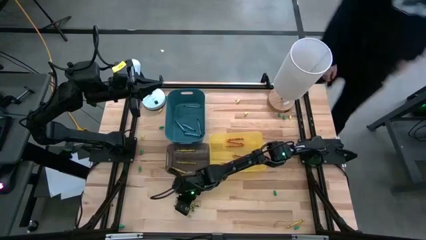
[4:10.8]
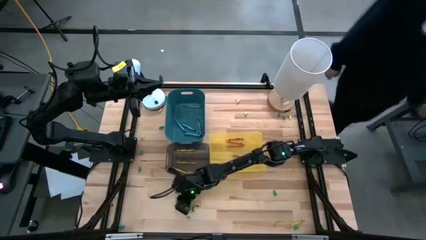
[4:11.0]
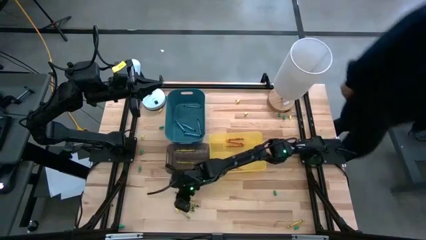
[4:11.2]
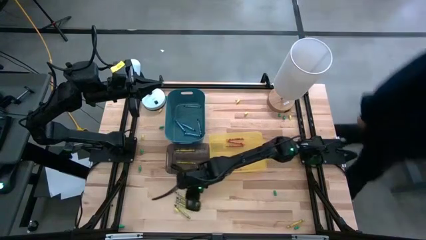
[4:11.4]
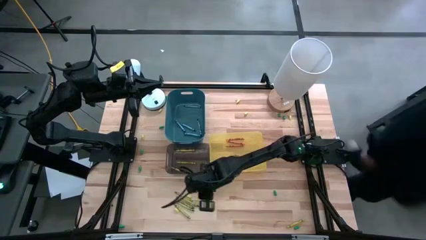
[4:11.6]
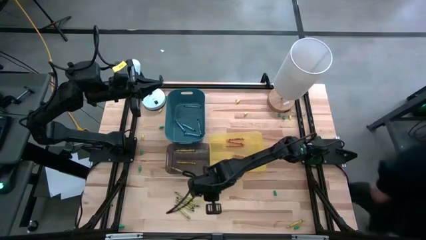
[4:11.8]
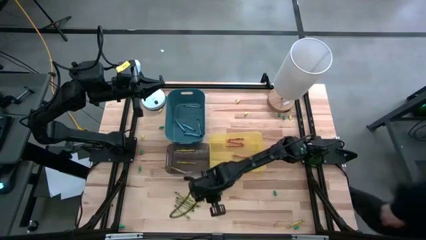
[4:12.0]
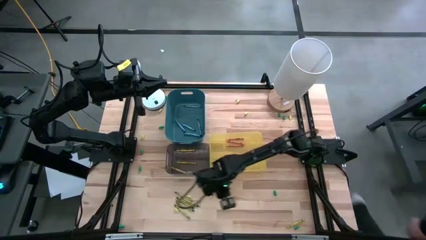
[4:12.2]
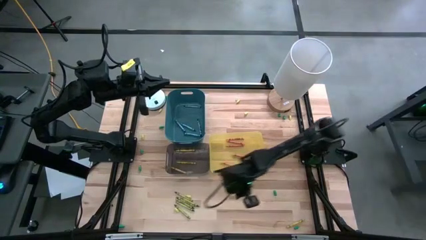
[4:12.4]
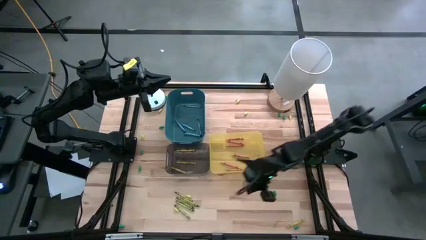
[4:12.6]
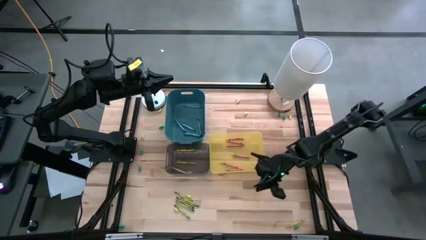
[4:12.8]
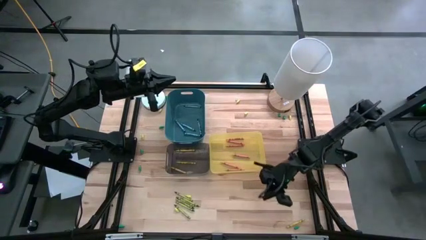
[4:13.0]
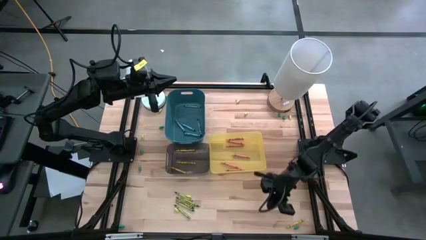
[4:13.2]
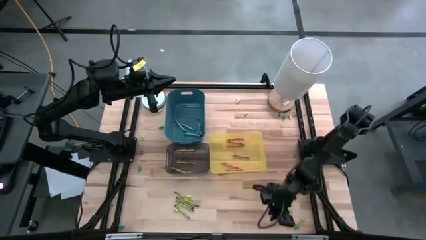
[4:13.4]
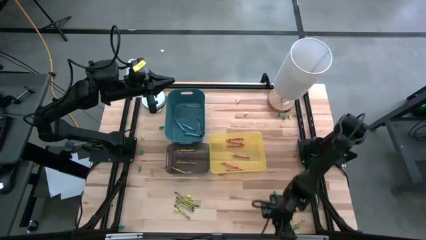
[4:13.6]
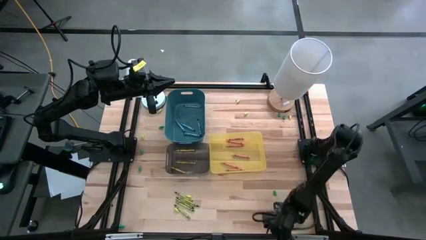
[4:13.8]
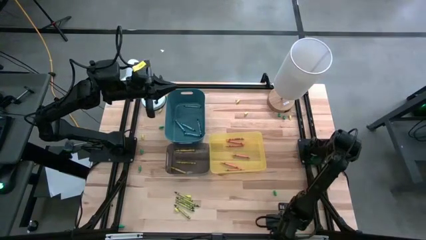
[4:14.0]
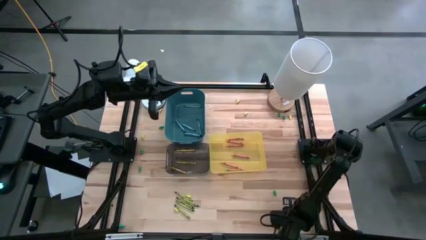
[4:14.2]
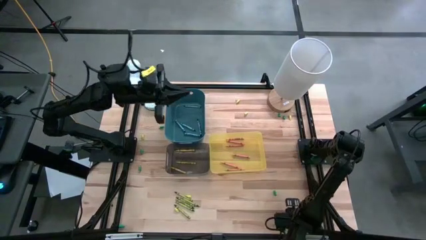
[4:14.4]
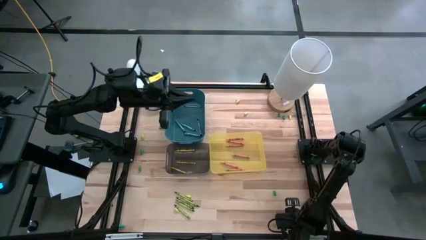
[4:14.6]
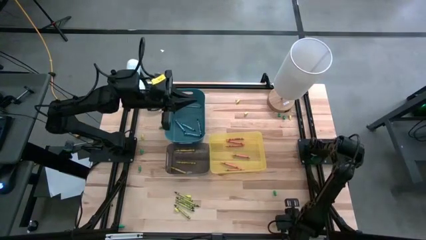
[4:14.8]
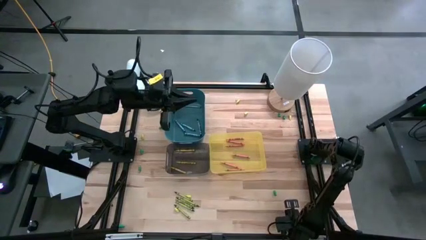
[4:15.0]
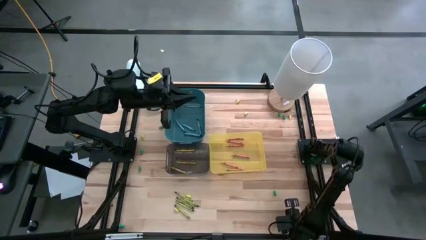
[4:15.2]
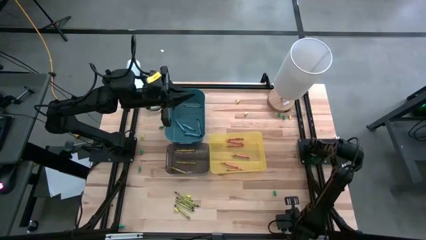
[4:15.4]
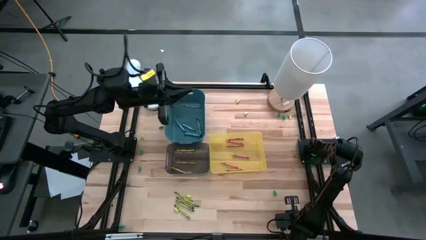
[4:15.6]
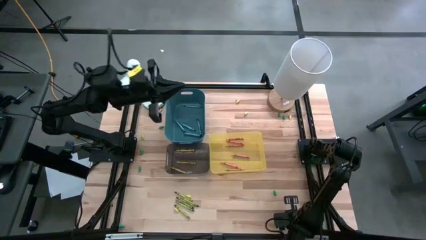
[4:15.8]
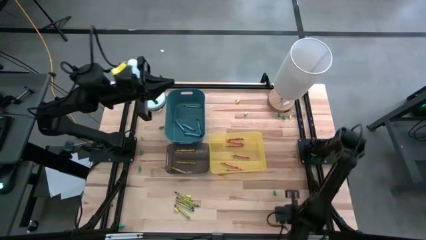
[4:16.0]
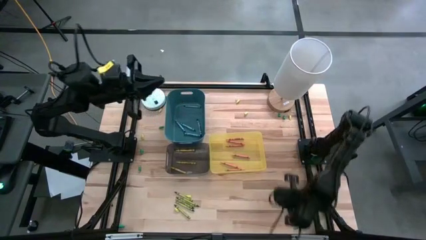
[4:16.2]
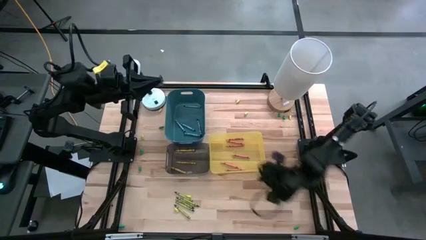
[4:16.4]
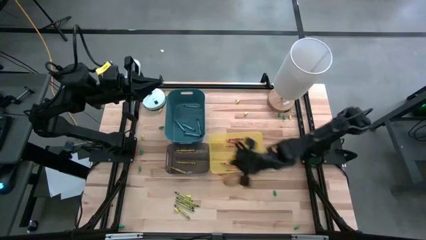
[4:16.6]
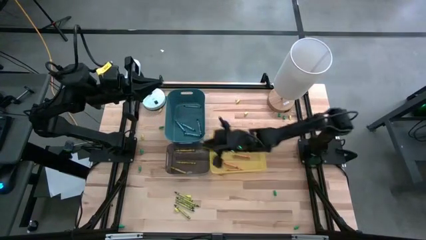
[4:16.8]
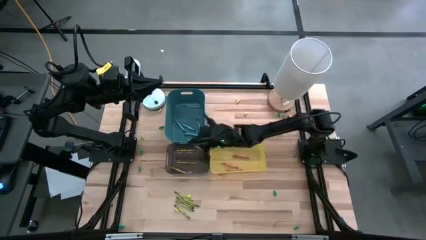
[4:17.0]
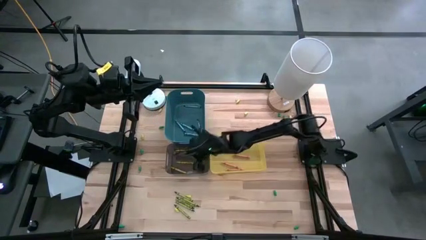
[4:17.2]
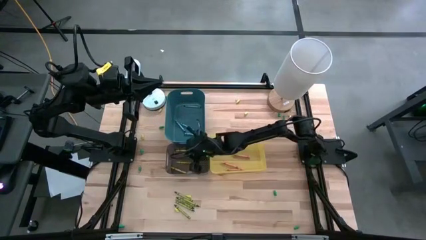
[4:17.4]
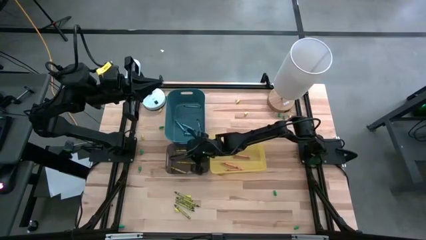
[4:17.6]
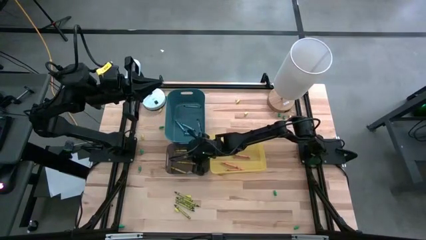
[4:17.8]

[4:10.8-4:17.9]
Task: Sort crayons
Put the light green crayon into the black bin

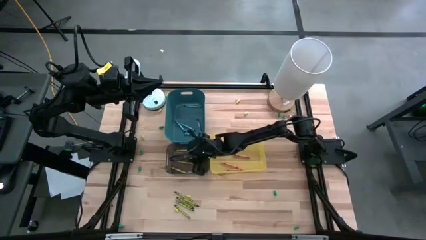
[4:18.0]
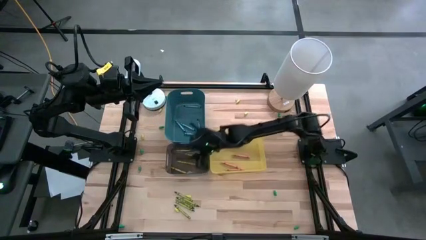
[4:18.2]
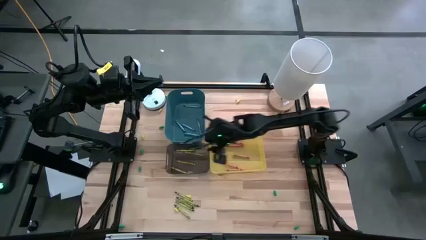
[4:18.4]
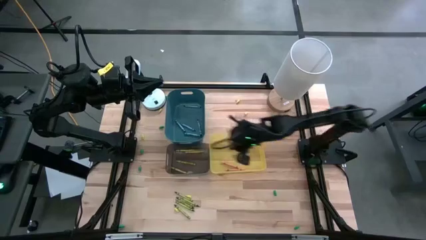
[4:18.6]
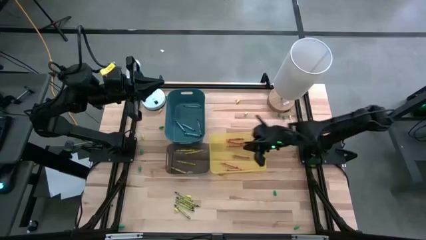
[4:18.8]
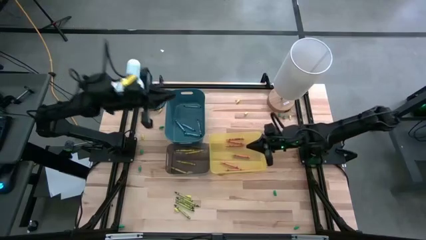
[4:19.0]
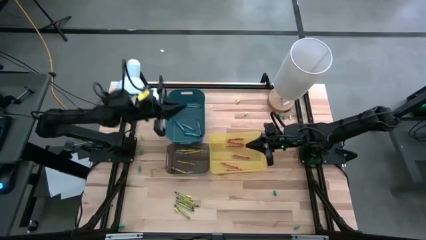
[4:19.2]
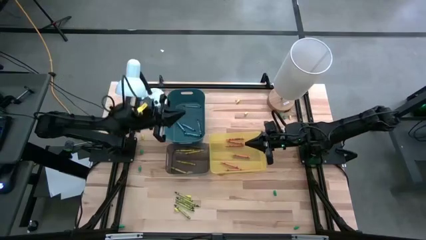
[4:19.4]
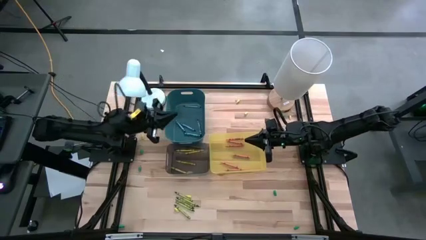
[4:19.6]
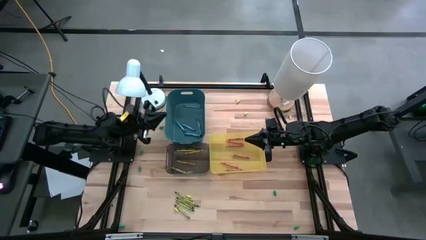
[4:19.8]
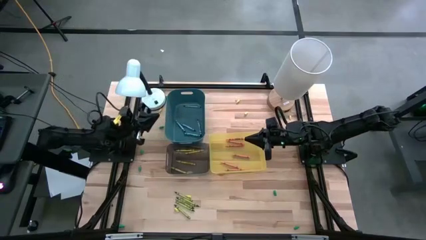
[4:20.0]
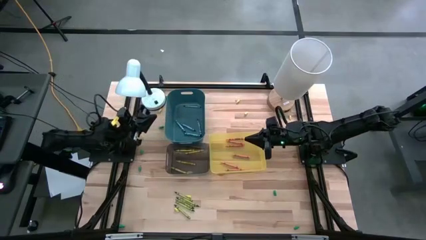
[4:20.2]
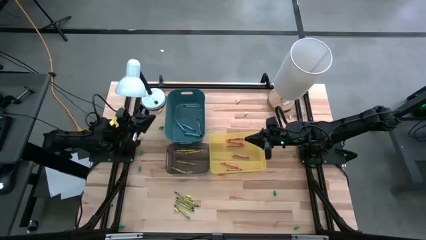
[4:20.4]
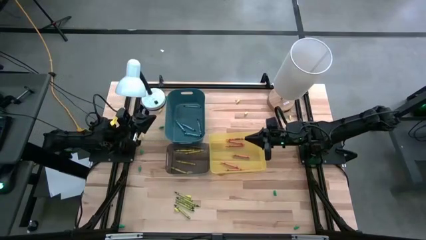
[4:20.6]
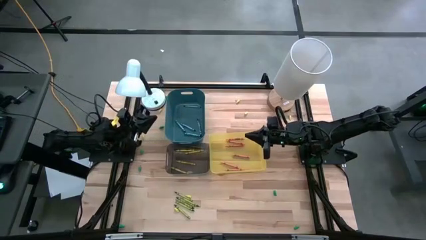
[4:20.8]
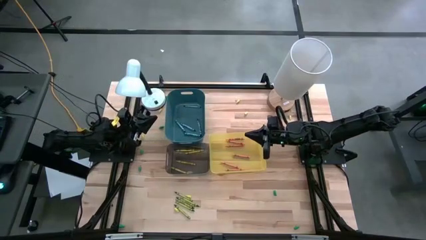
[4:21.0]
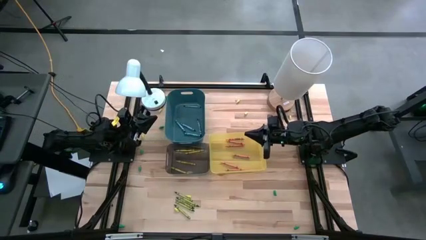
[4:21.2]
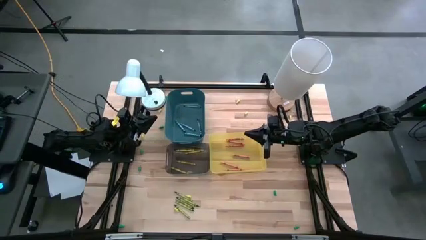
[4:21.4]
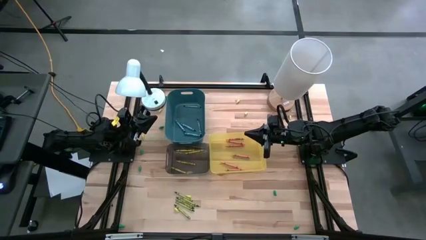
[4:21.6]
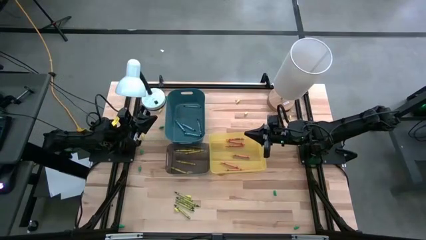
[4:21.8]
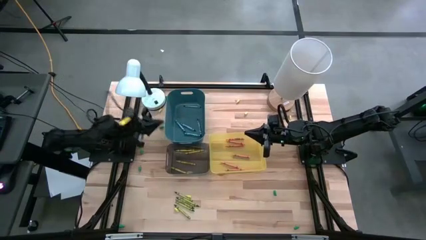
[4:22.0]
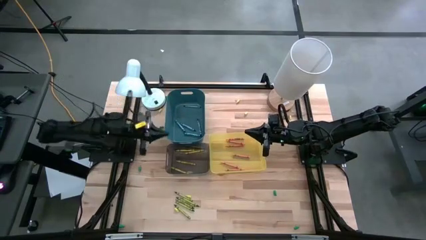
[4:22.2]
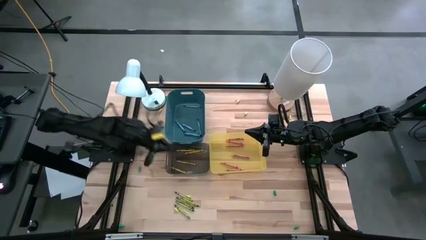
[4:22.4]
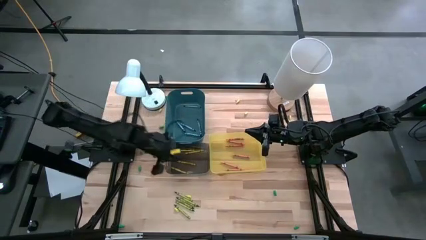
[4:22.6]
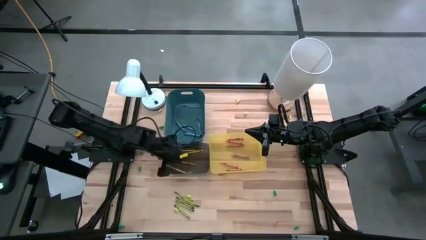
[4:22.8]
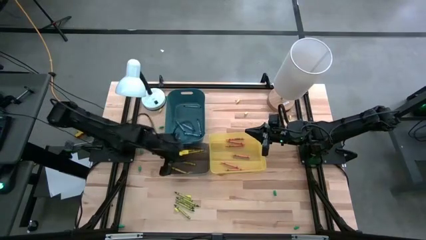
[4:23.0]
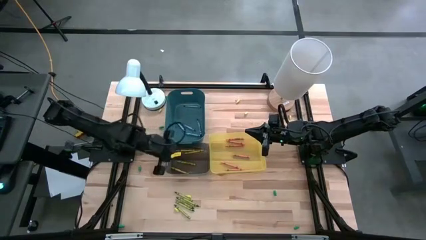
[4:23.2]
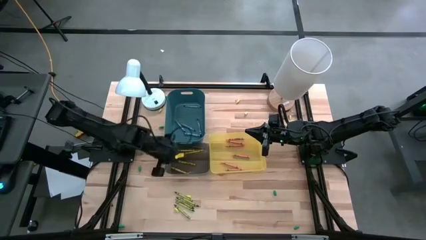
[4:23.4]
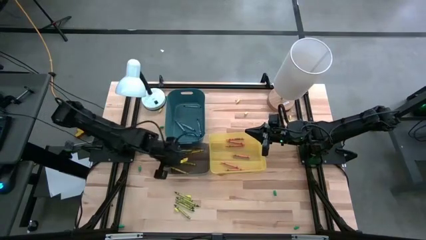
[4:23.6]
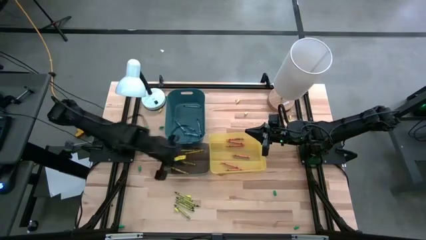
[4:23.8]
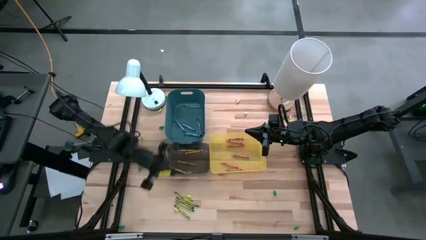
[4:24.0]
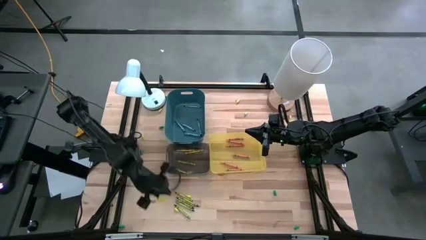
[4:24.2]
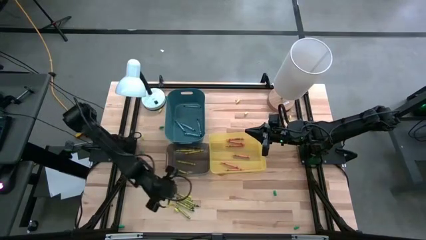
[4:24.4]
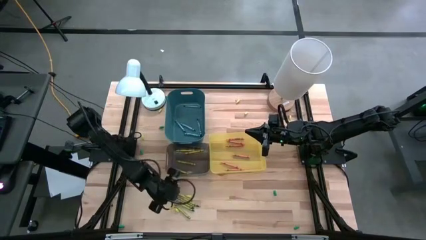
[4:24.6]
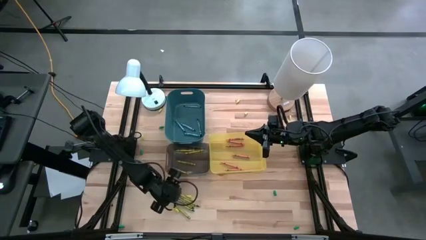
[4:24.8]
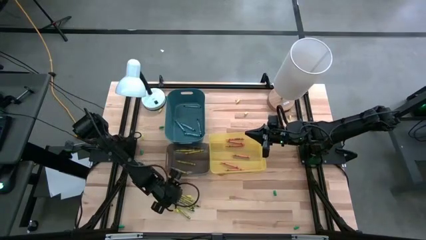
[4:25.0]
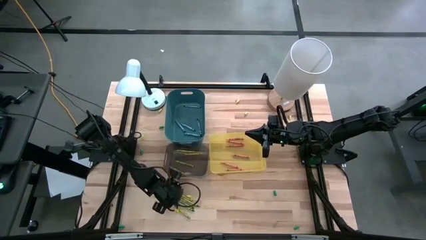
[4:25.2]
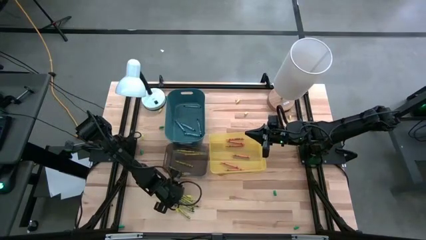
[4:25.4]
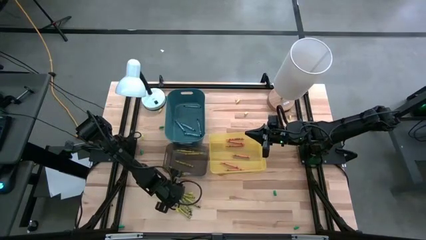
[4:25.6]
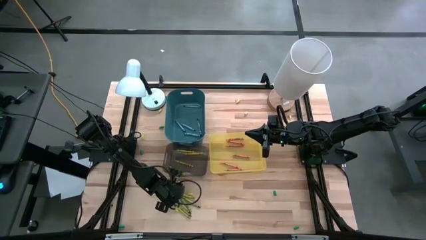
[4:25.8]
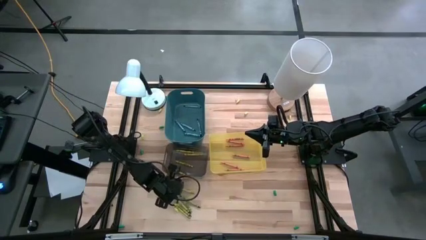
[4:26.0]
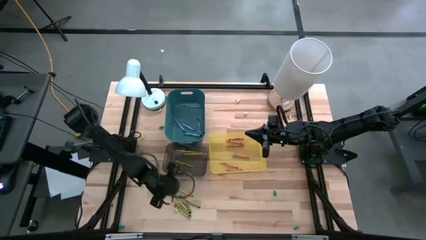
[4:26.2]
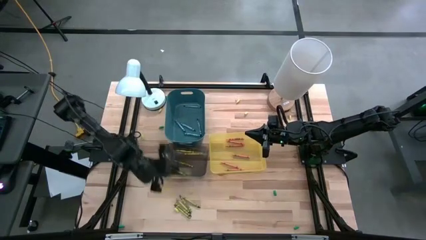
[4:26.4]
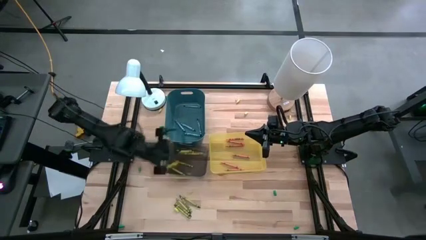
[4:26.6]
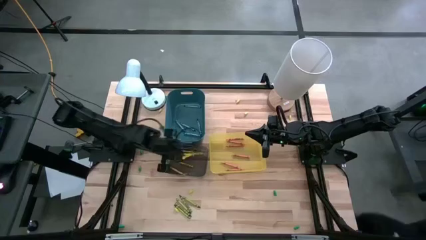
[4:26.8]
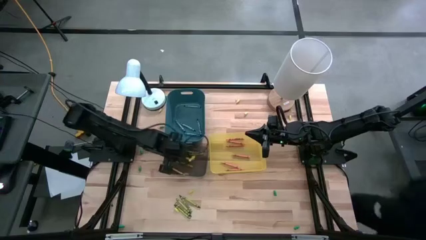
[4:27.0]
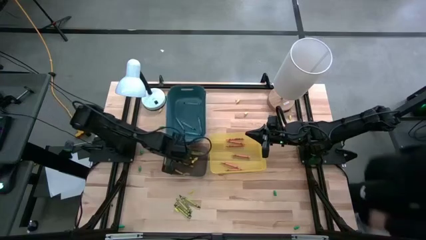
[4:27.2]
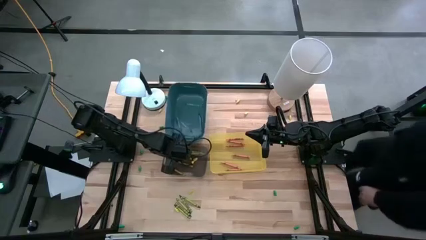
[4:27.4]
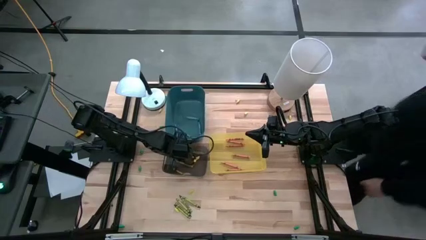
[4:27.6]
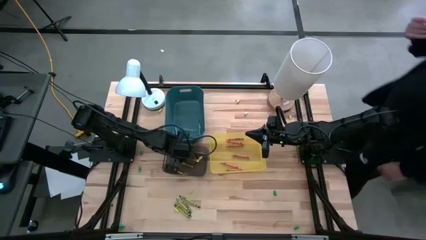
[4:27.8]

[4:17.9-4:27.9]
Put the green crayon into the black bin
